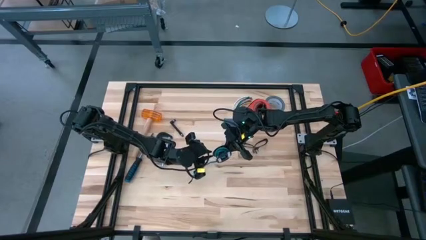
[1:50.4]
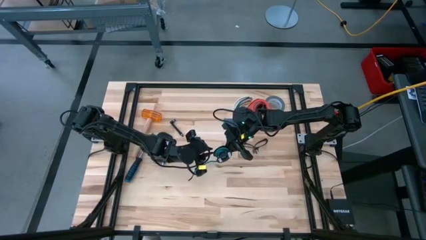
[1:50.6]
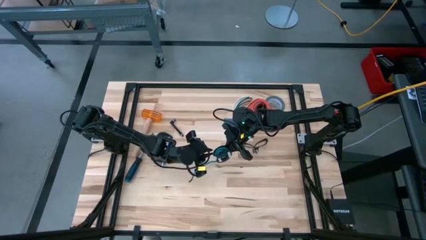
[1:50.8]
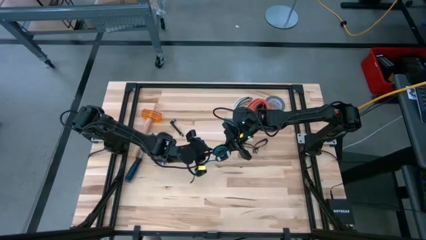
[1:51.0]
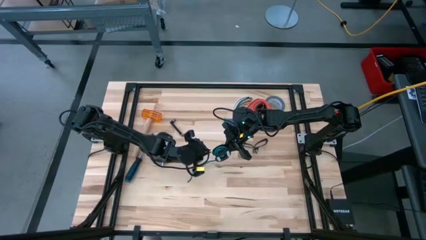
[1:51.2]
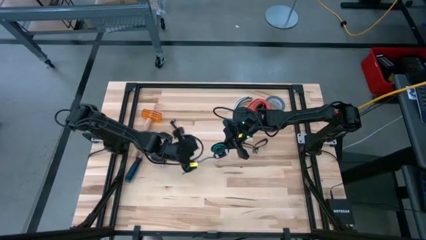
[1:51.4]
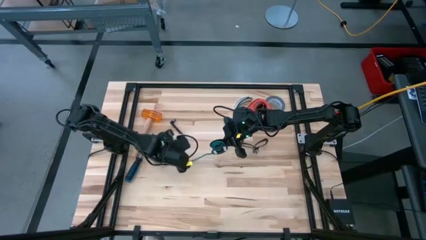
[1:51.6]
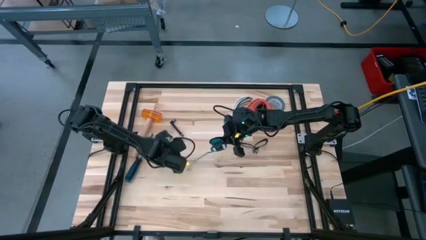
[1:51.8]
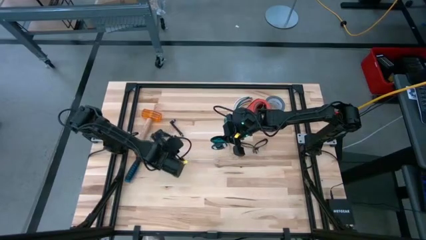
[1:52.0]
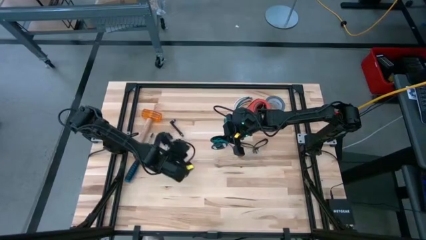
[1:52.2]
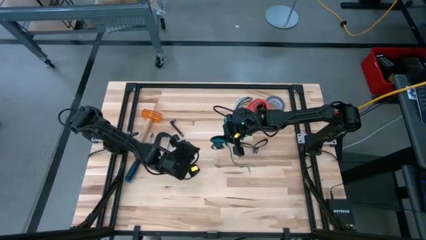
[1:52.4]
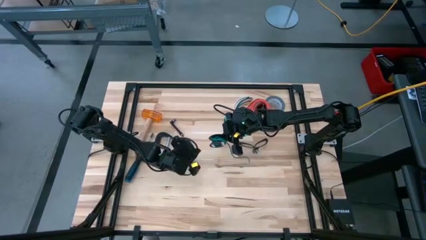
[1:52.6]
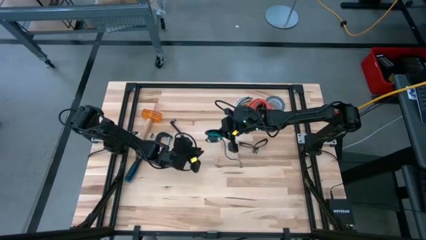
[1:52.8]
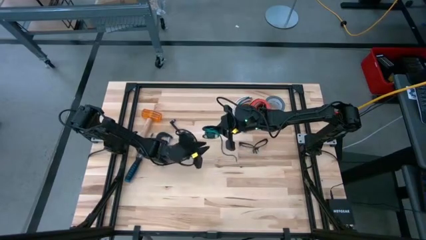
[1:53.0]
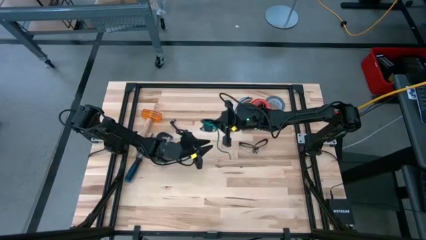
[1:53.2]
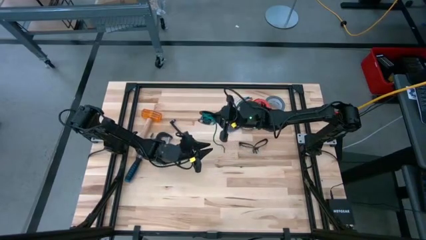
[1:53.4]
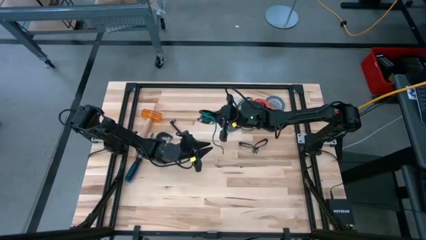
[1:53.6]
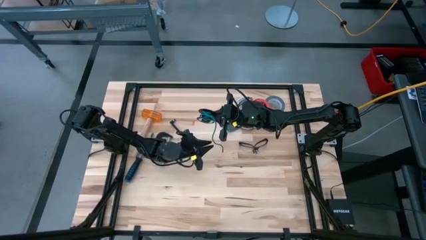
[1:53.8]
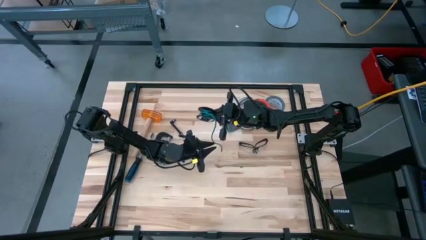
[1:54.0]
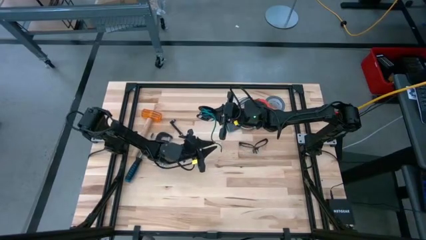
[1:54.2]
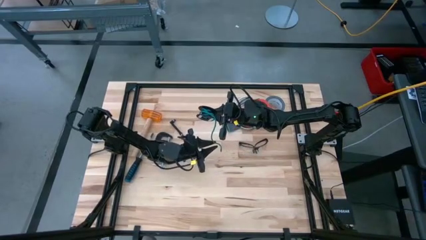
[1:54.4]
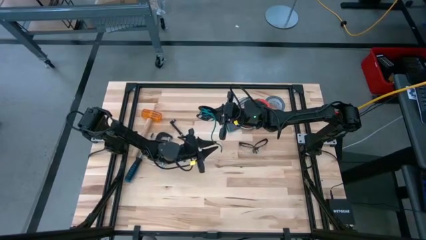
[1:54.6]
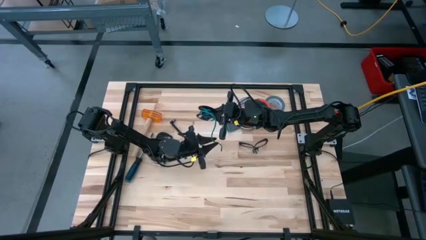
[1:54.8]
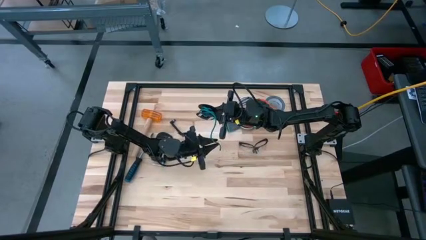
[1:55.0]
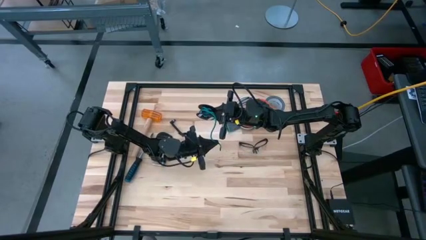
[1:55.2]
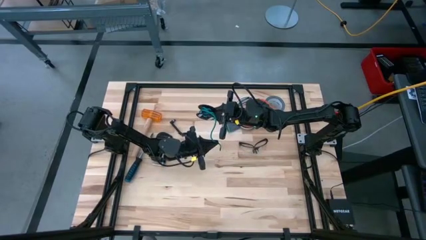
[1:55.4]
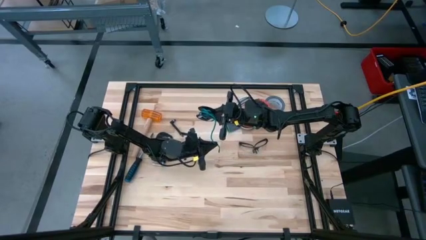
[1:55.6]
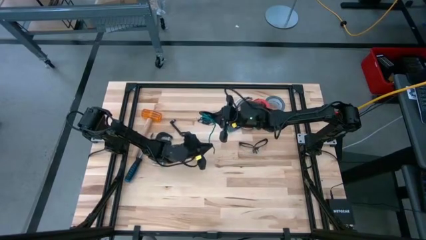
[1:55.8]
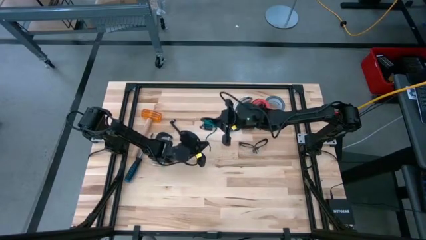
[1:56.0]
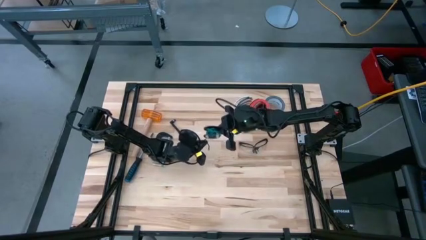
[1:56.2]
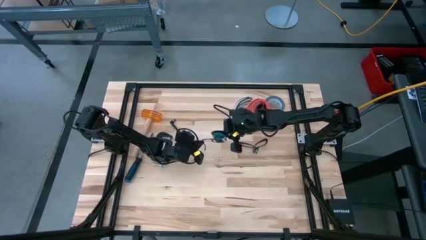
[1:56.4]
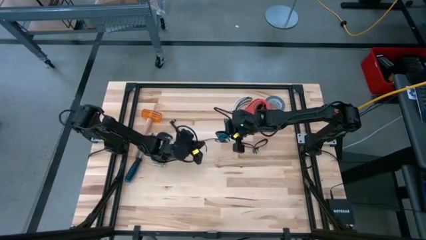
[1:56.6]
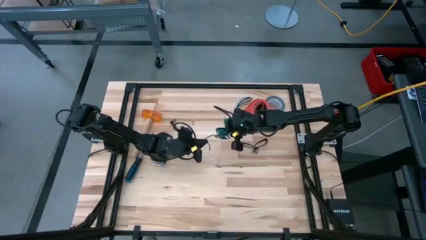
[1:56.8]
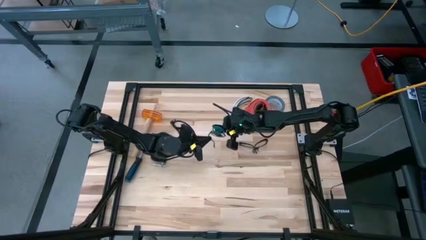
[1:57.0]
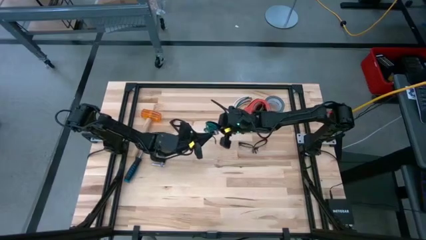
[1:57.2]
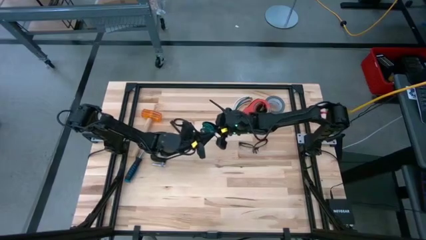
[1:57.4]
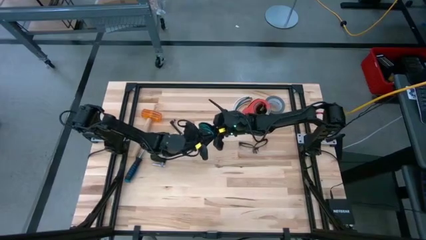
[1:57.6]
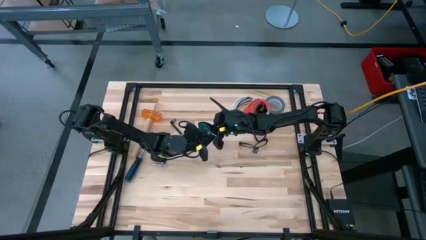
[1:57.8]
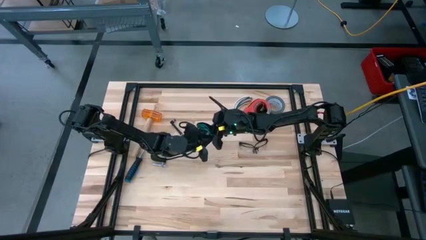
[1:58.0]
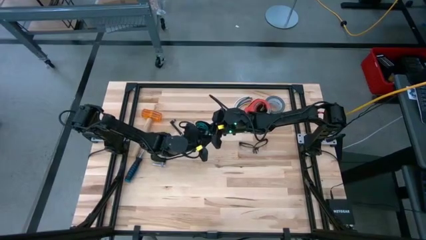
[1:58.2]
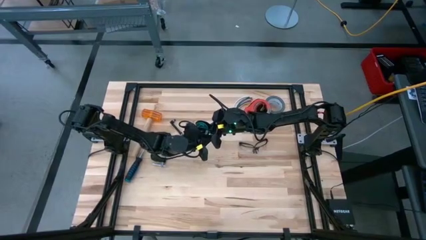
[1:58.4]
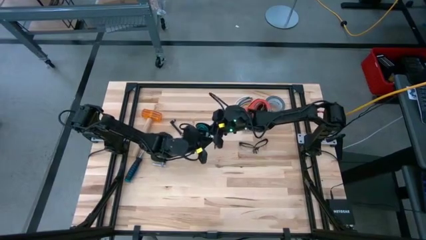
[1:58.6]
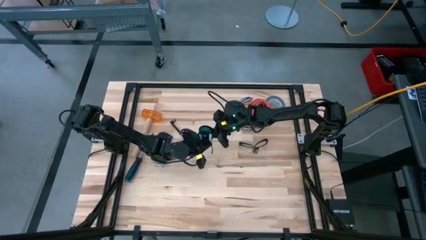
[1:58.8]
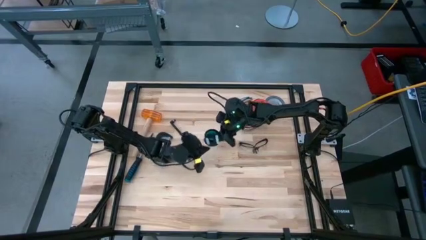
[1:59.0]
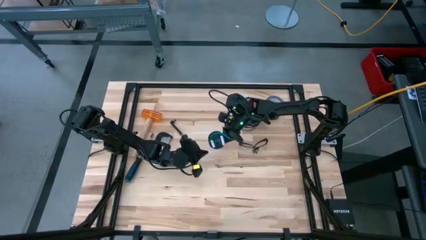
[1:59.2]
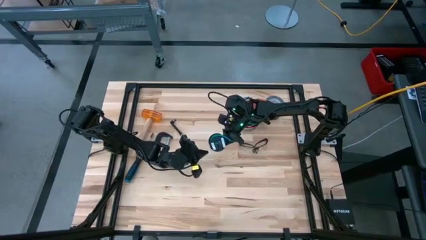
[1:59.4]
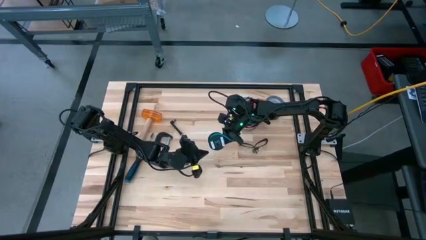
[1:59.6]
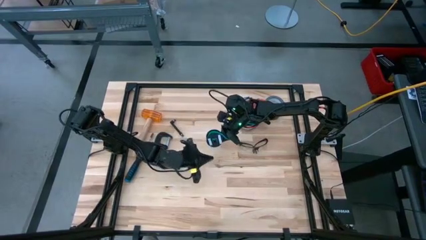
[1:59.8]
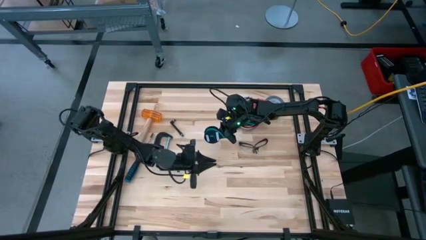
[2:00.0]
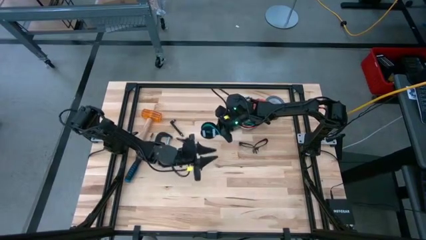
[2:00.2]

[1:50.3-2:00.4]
Task: Coil cords
Coil the green wire to the spool

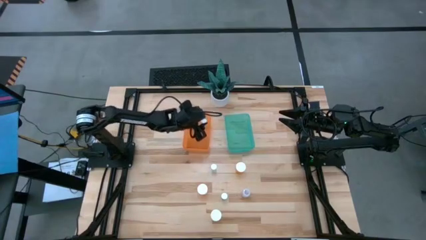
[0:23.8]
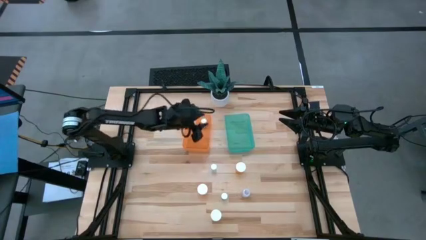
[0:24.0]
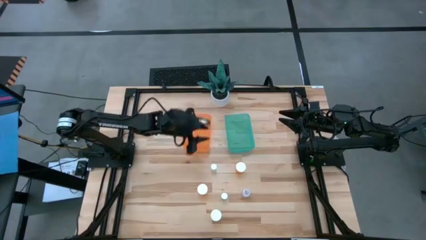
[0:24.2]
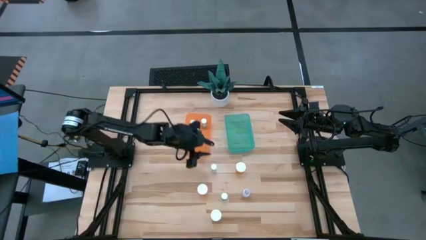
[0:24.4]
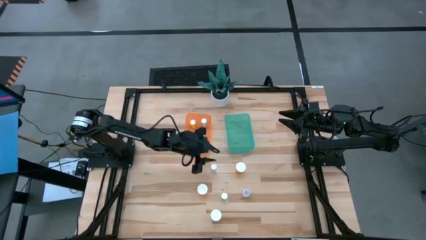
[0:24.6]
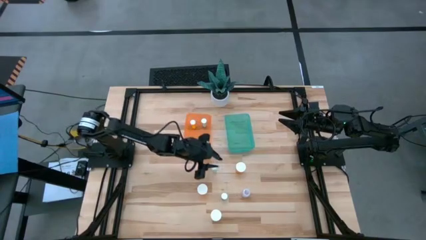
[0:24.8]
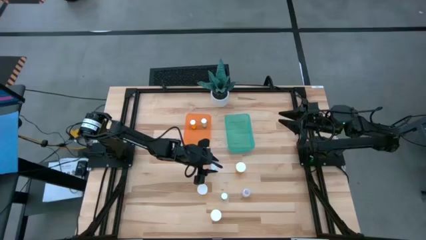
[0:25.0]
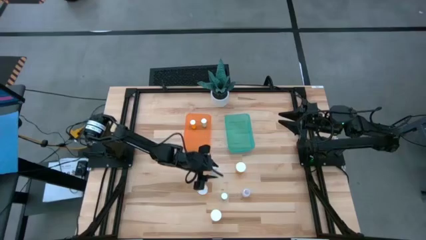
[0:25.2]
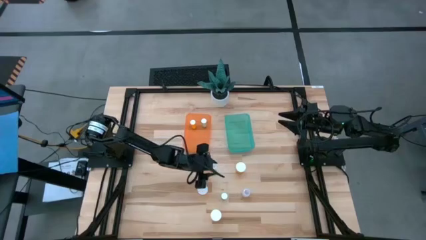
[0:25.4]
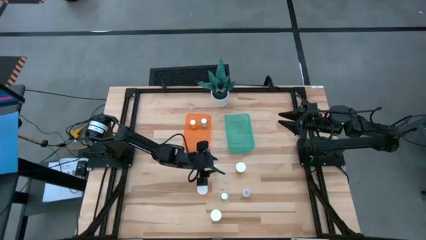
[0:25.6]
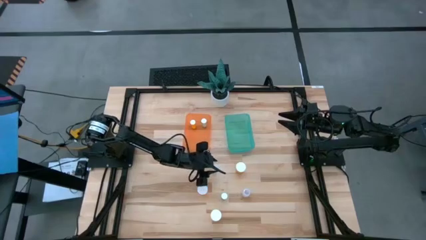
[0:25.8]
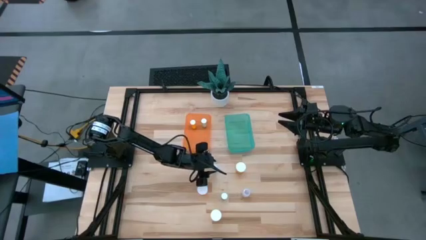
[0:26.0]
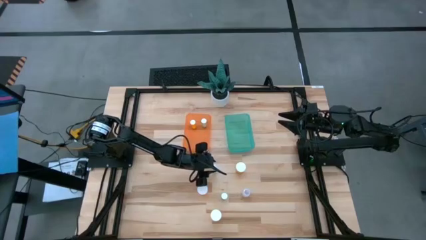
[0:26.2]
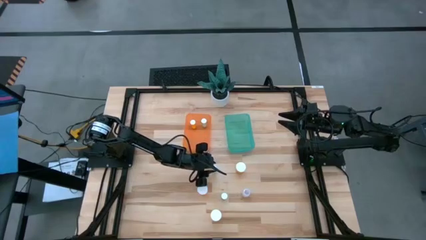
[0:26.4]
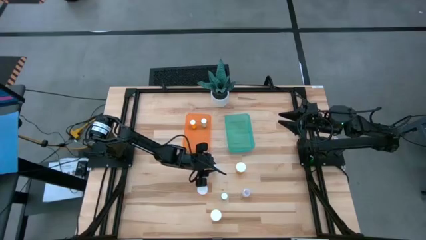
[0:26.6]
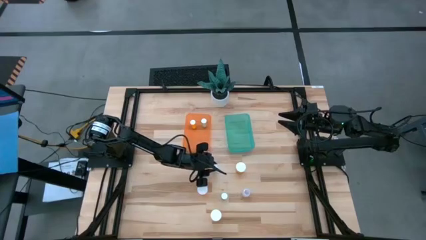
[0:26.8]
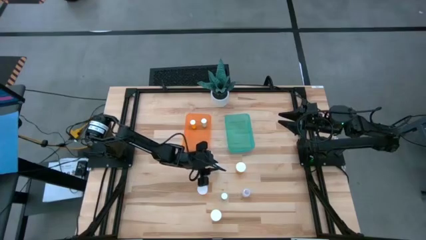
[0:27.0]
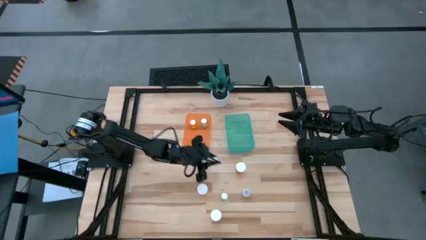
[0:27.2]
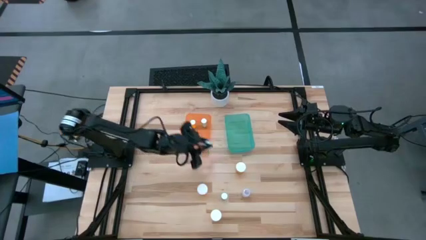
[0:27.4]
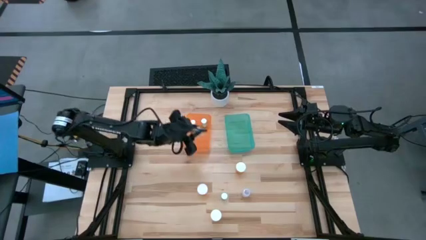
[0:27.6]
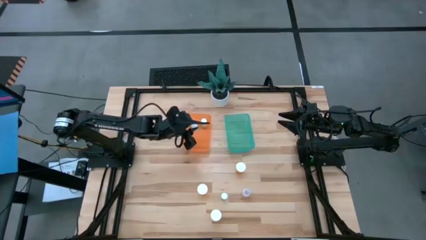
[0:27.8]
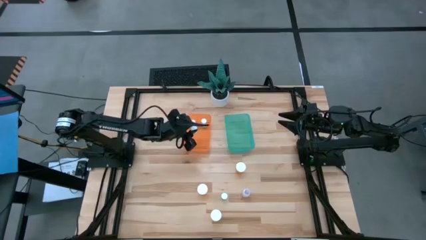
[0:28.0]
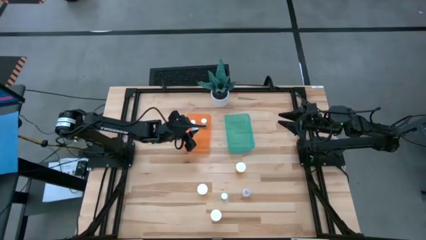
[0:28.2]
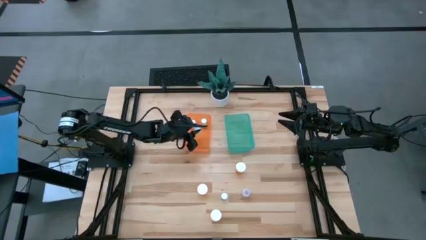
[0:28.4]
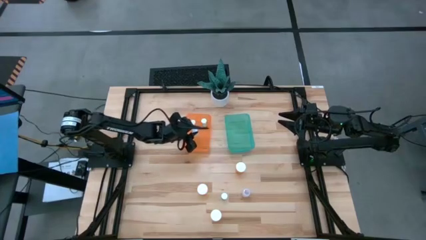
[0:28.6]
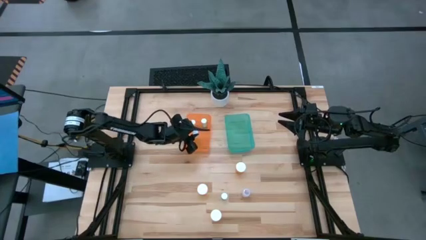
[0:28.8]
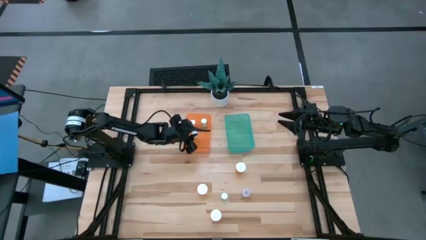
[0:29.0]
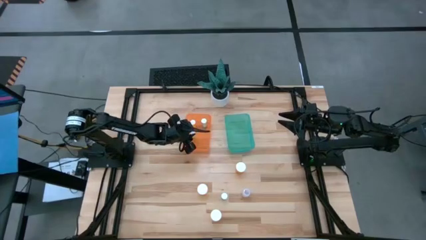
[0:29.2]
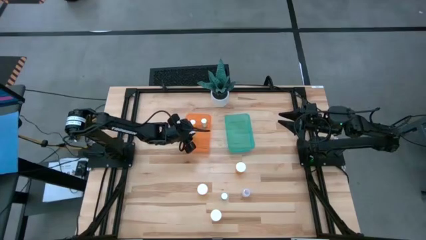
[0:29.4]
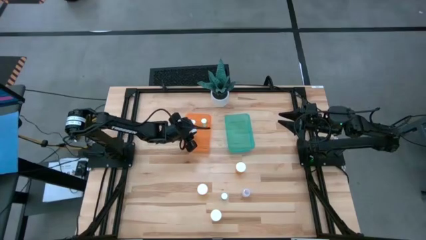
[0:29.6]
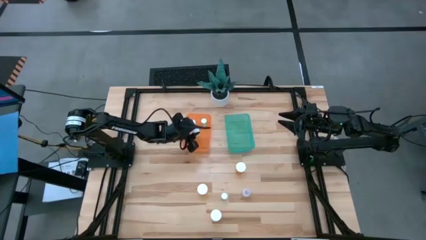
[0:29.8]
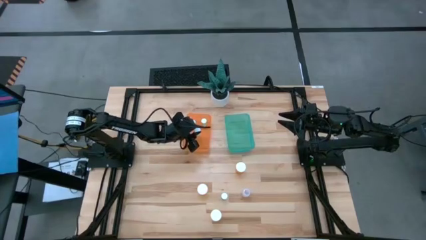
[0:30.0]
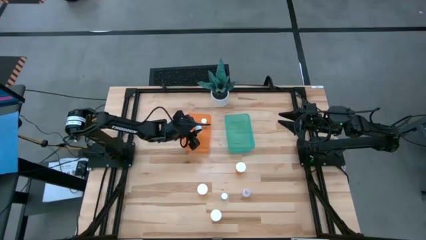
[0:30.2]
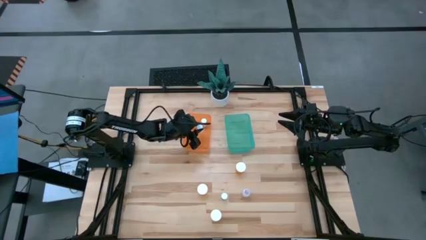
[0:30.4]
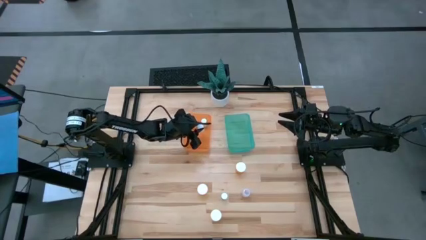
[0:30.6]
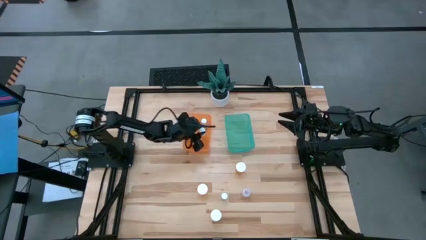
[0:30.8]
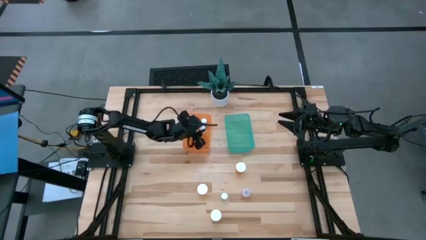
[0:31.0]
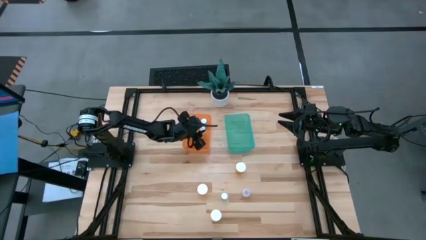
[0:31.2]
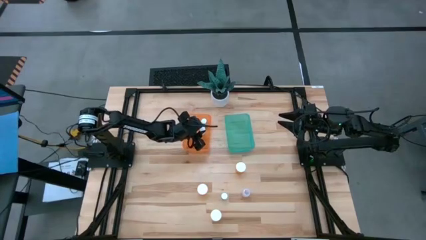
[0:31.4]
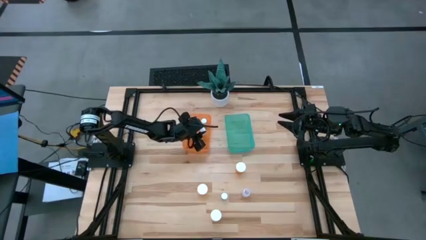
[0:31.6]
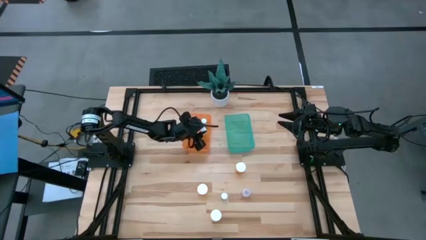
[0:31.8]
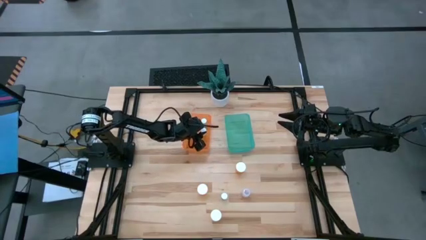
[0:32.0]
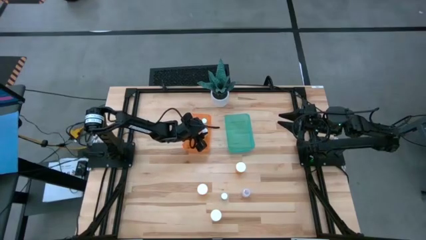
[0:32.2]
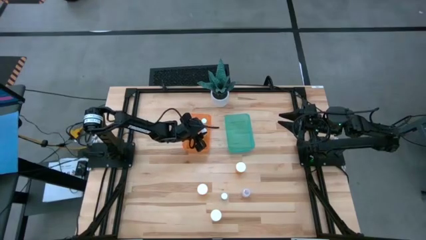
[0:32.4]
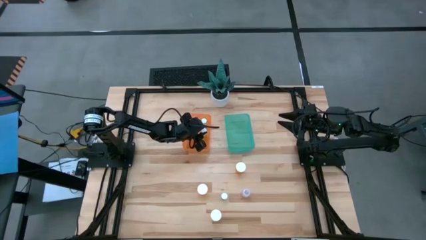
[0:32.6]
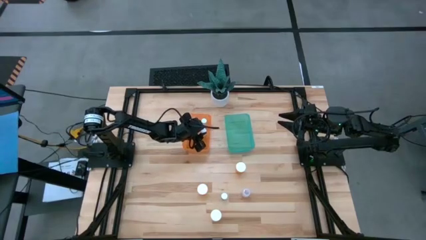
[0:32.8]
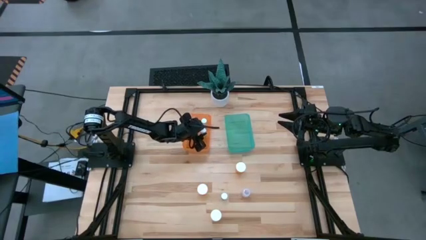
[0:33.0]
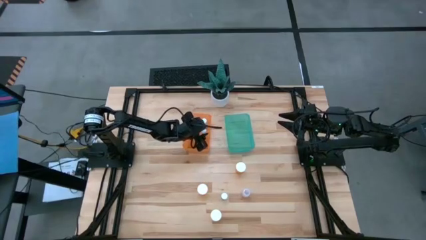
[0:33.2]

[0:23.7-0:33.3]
Task: Pick and place medicine bottles into bin by pill shape (circle, oval)
Put the top blue pill bottle into the orange bin
